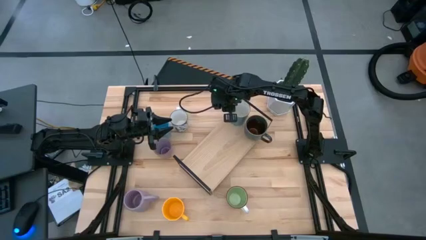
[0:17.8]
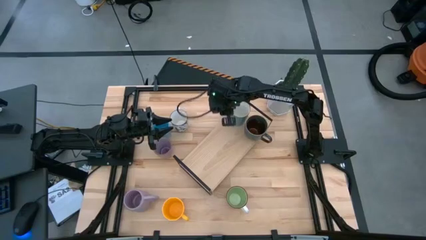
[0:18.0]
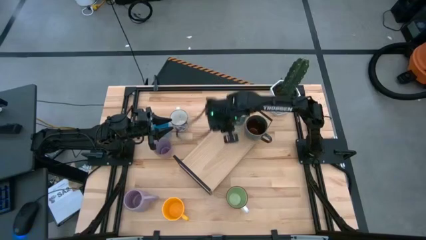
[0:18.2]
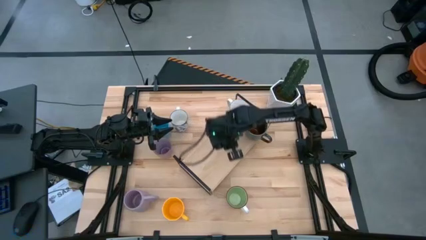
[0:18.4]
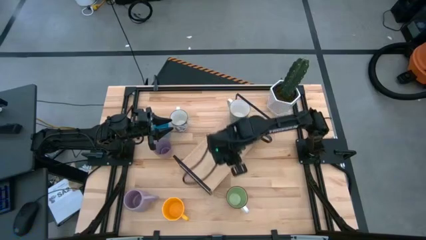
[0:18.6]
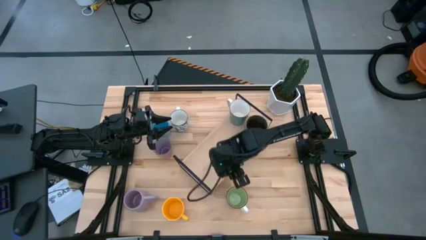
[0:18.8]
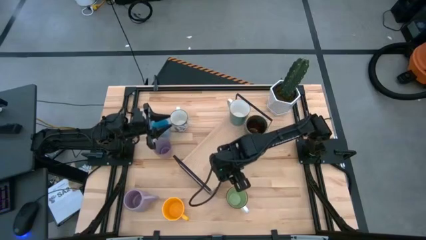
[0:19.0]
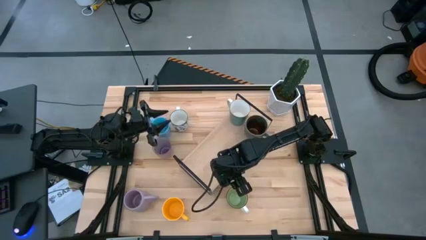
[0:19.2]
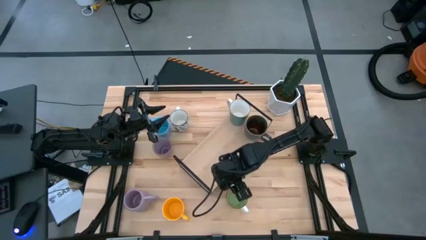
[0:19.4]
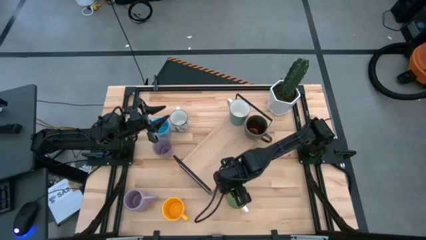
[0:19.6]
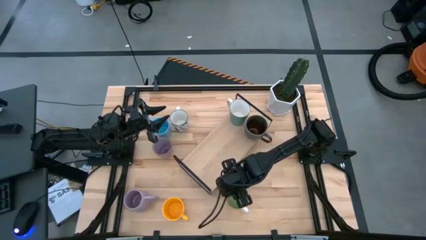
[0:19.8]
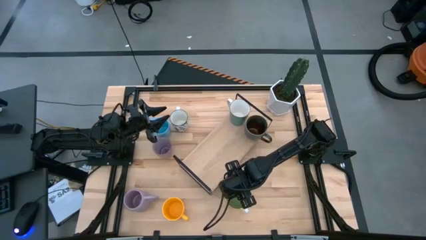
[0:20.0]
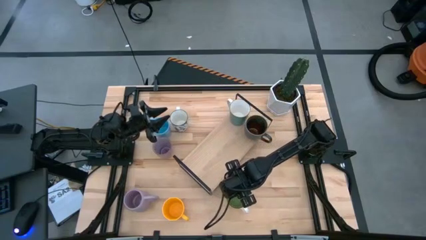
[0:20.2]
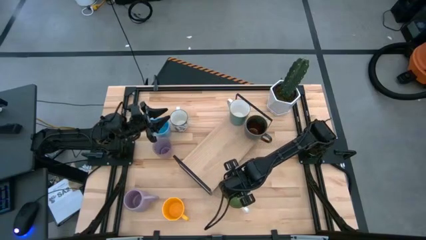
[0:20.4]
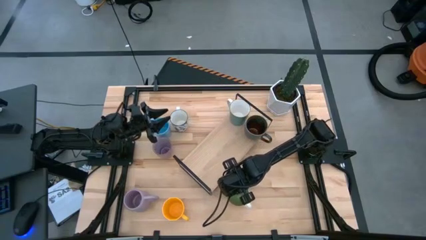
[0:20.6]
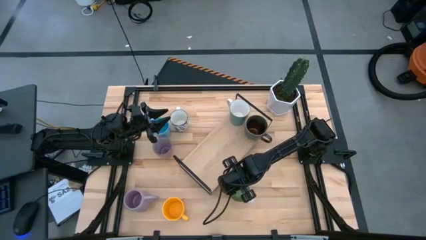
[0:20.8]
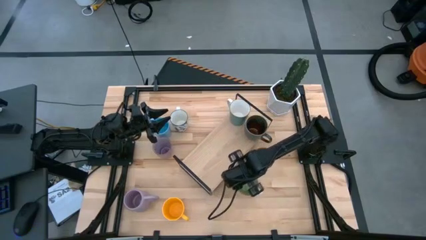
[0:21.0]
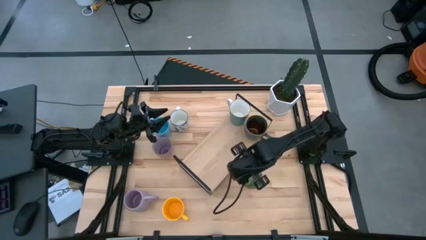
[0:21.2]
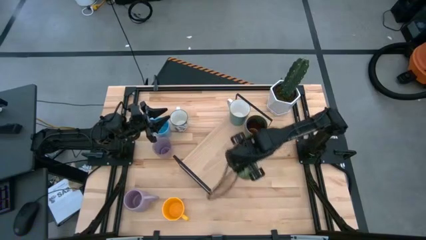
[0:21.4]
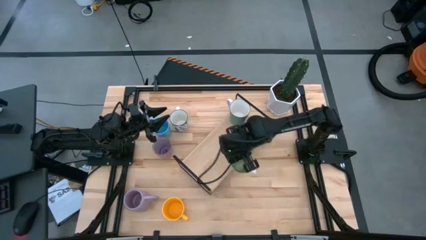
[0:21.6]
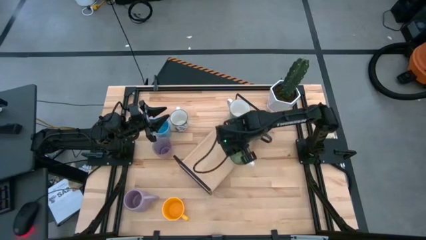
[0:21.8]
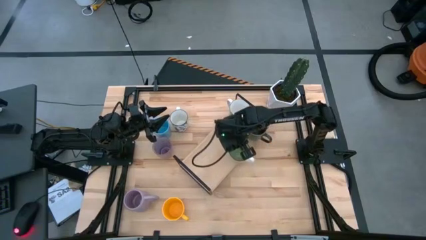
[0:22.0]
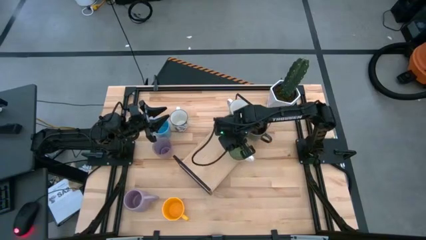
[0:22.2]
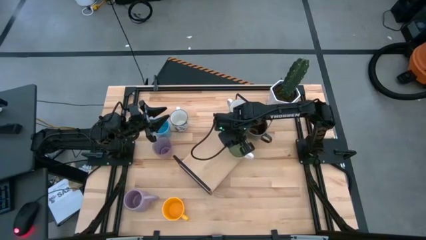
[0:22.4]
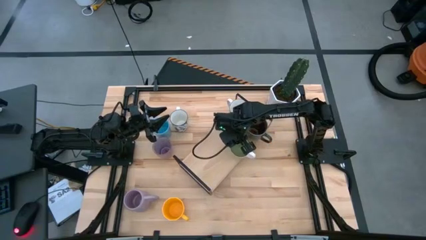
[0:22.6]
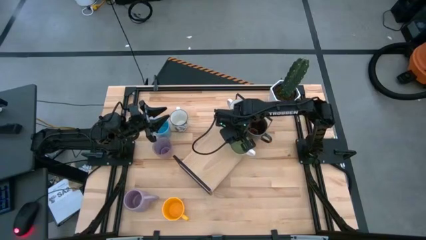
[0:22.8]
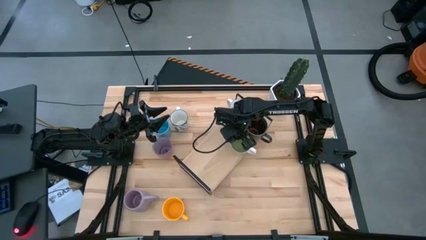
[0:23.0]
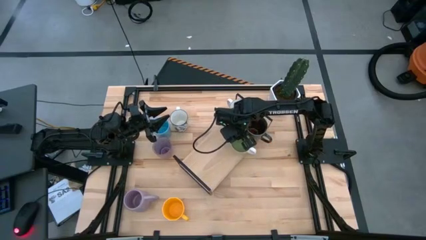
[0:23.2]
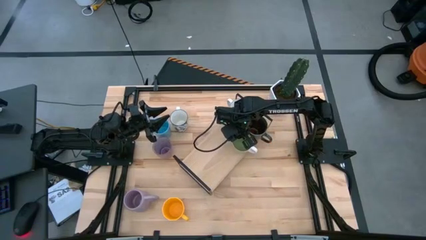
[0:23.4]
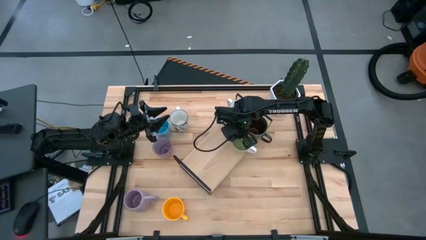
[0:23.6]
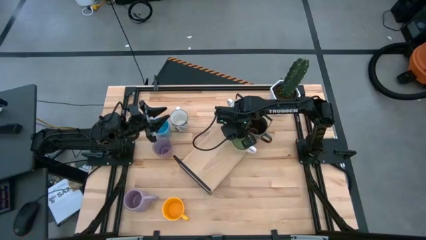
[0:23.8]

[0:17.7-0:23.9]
Task: Place coffee mugs
Put the green mug on the shelf

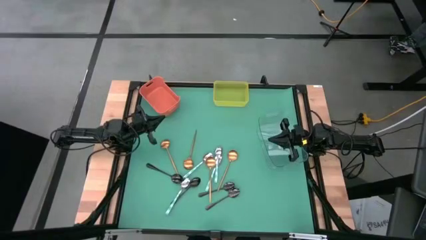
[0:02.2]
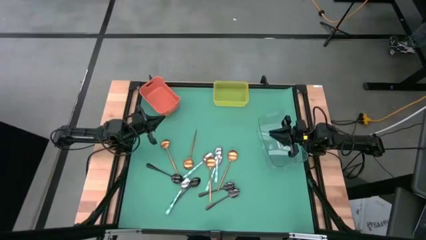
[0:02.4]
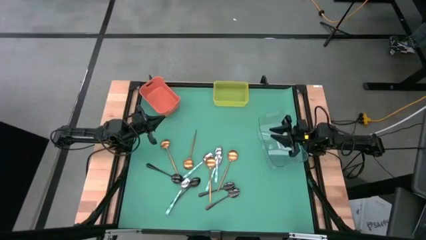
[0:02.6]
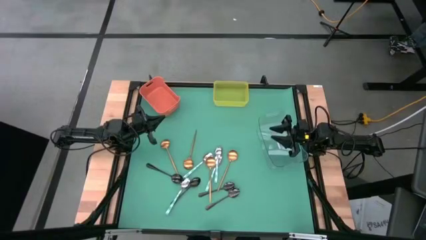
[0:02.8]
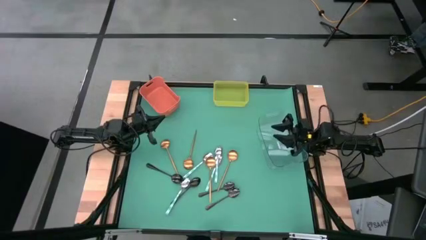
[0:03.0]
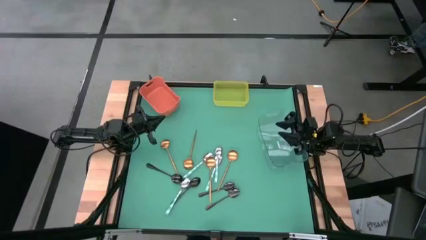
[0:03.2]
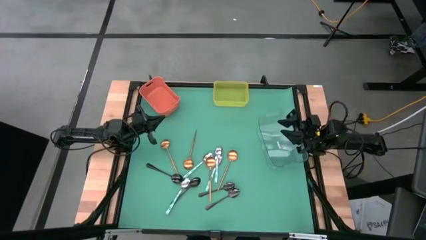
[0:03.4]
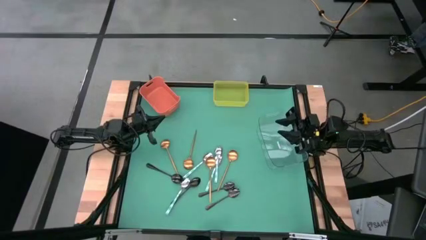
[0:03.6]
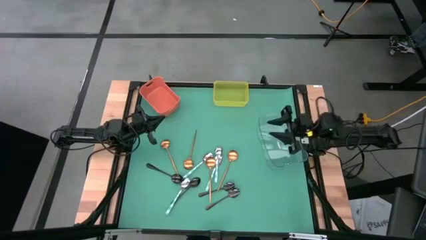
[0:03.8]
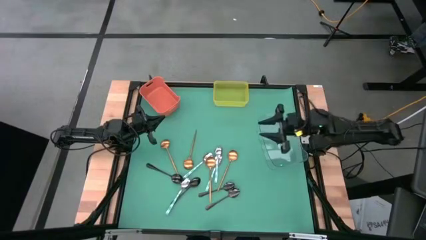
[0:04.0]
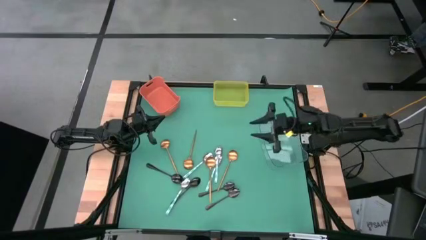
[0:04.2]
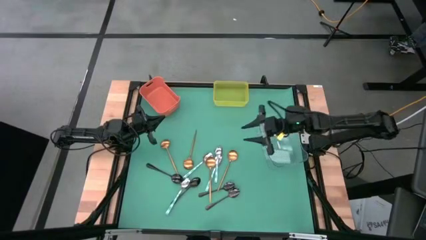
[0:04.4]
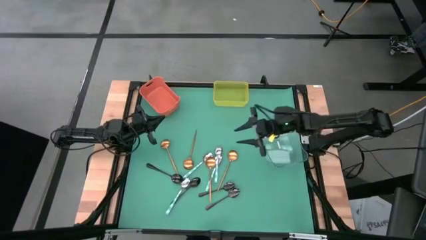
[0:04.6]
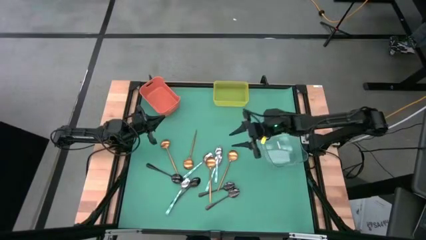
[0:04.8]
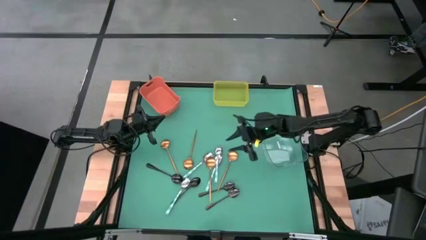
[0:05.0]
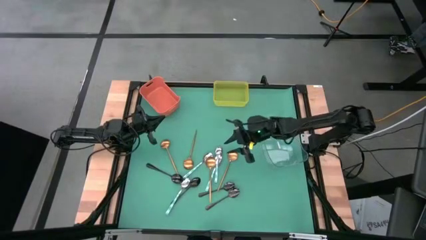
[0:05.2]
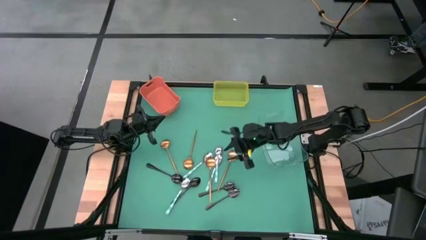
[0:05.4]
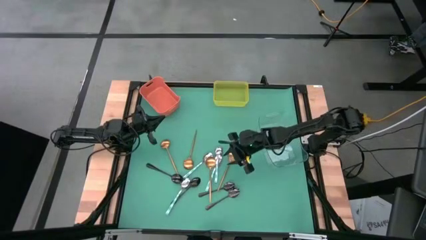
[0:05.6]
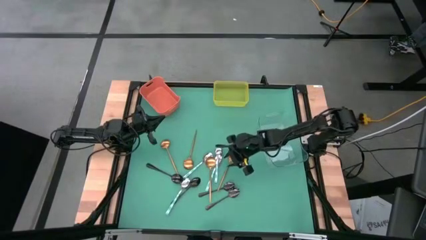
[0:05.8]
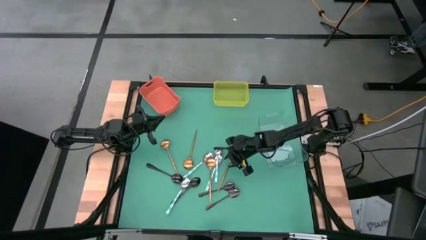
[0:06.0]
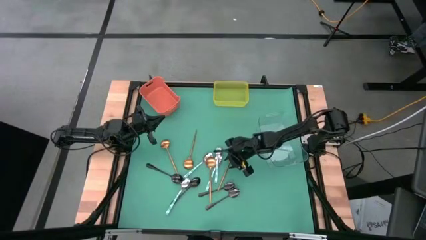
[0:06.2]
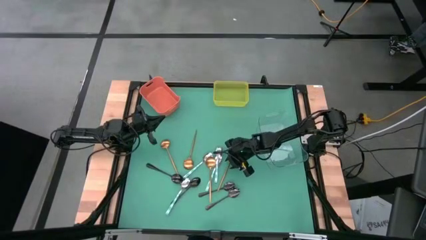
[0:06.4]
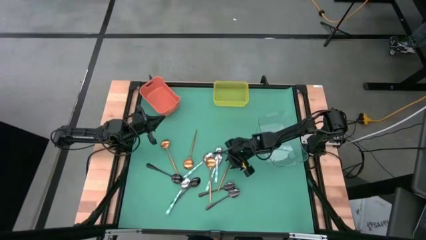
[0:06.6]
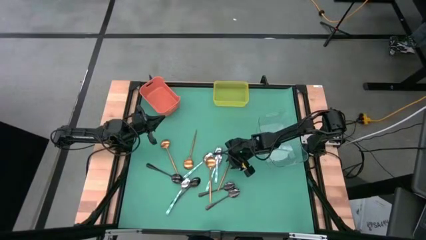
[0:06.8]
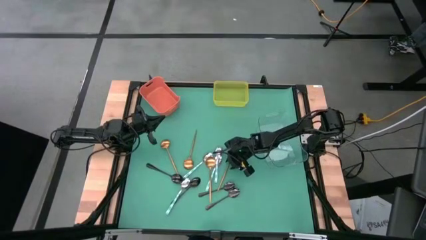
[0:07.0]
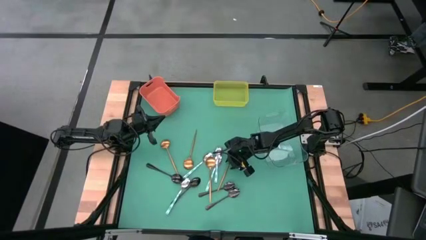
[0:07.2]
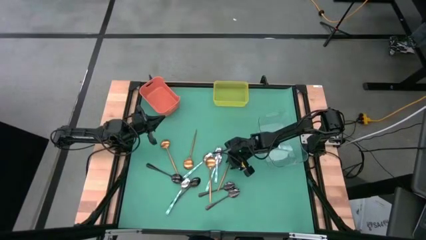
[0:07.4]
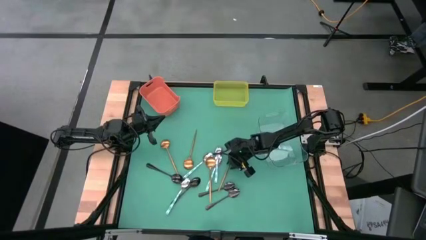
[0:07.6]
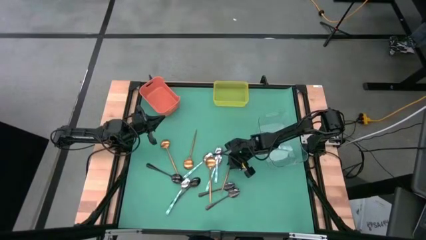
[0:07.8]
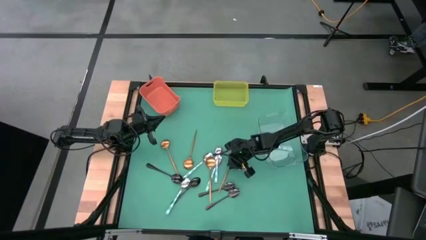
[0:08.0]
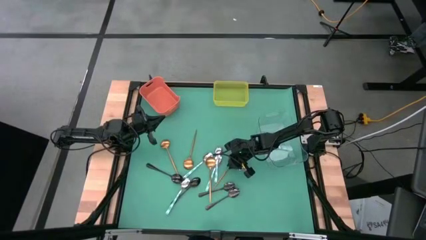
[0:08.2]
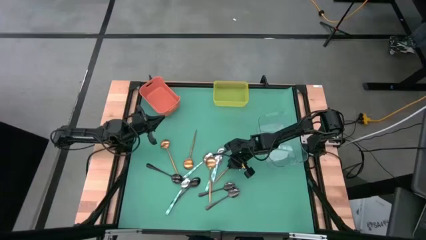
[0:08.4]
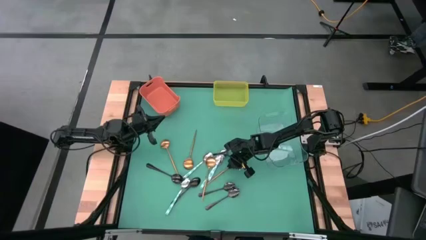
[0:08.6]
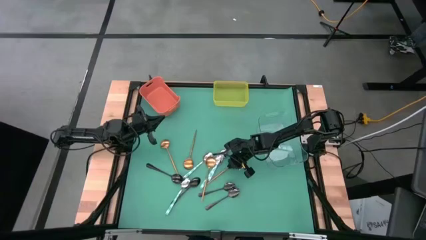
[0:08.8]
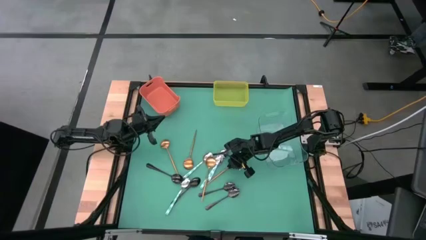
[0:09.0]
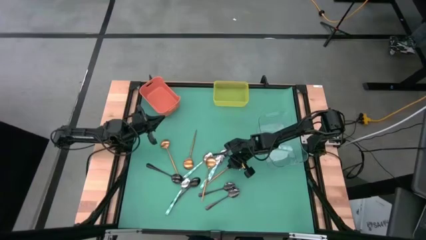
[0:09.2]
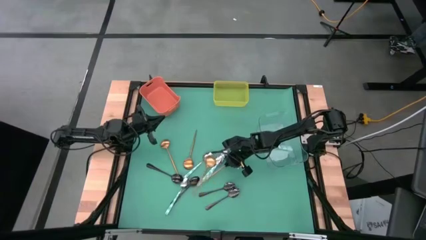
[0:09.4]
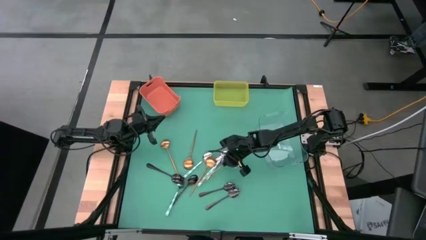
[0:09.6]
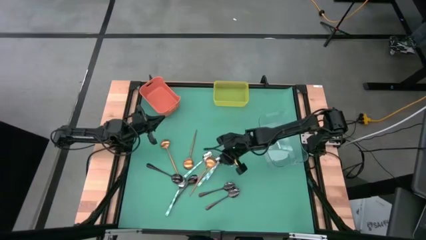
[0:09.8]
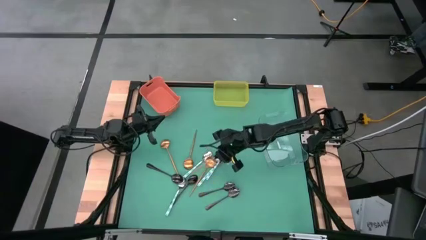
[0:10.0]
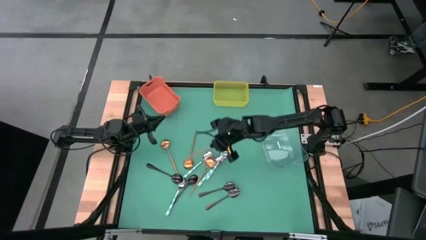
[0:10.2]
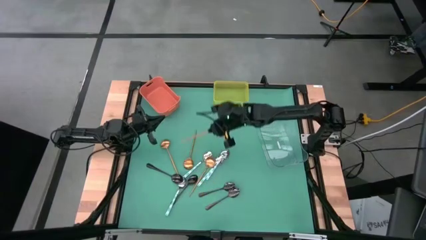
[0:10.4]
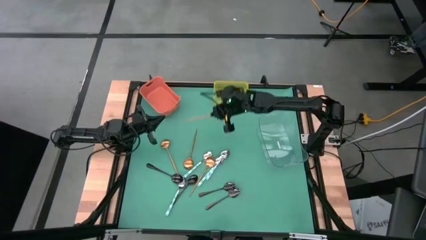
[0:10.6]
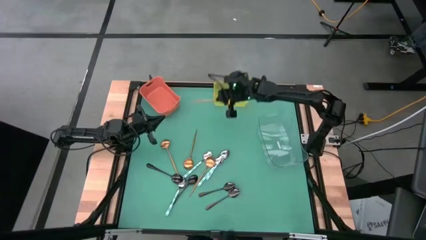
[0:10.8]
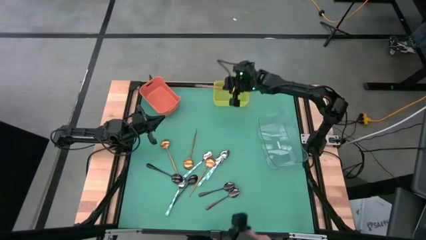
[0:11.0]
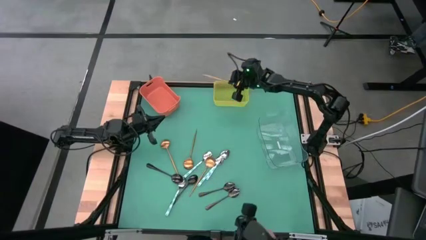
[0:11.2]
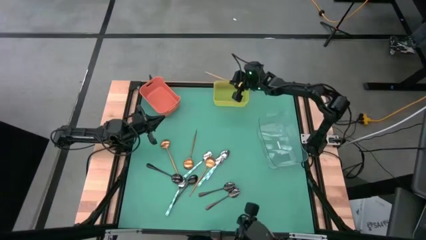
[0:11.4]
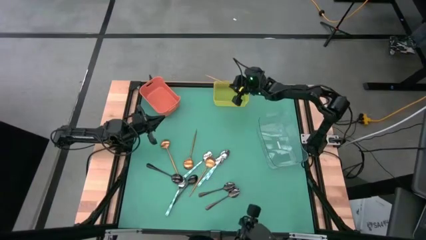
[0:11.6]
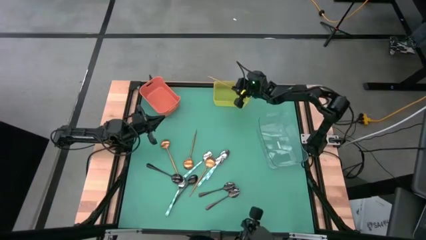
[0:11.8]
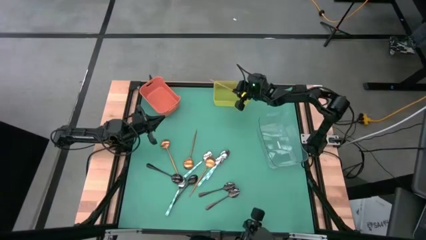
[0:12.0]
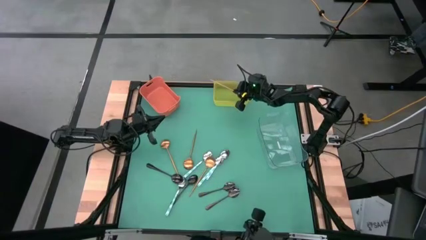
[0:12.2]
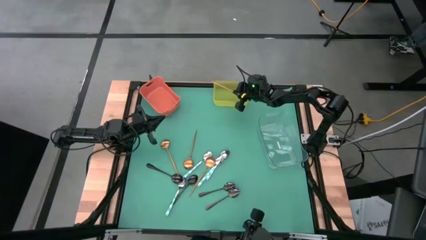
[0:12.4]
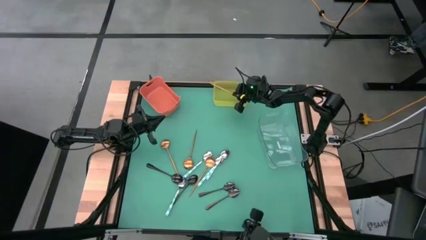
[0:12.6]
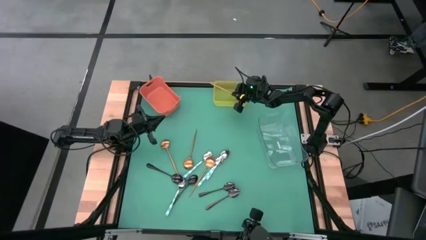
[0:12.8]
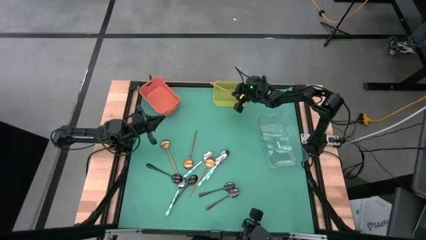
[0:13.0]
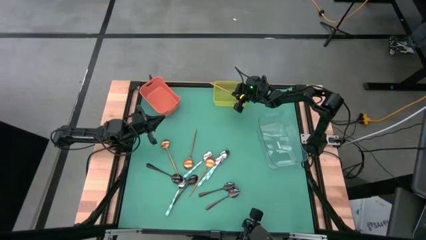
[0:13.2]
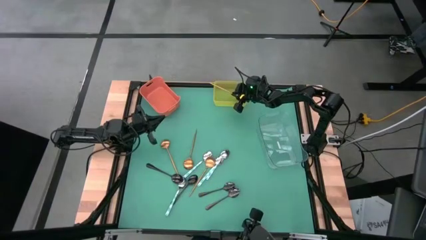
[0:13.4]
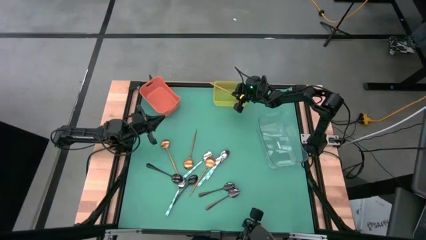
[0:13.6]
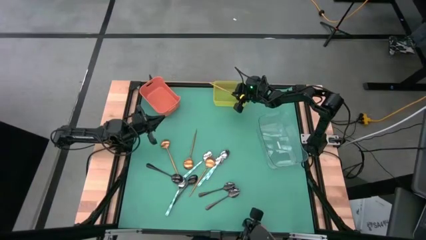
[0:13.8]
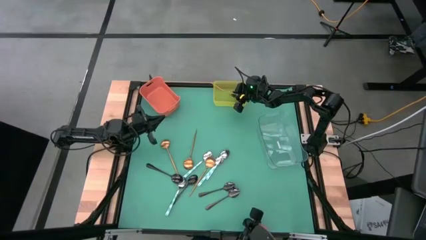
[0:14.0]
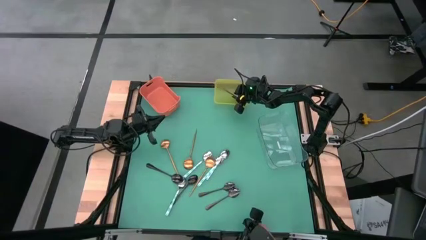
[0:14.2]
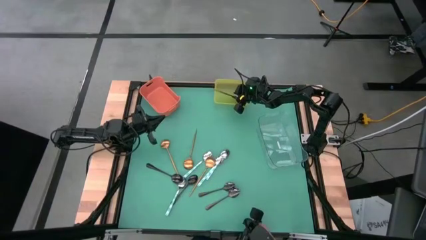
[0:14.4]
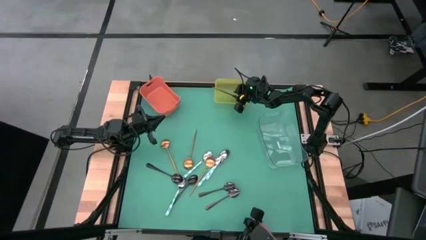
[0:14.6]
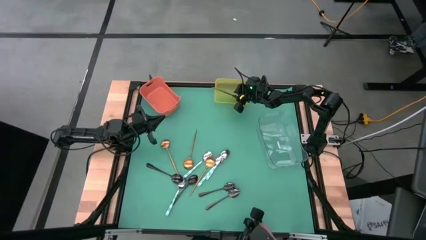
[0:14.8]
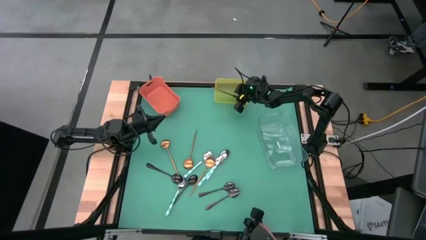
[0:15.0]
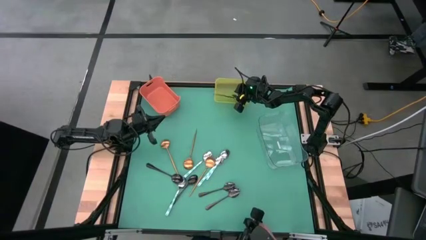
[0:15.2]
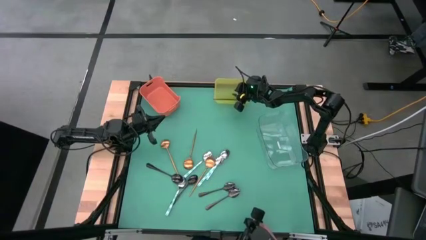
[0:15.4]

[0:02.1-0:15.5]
Task: Sort silverware by color (type)
Put the gold spoon into the yellow bin
